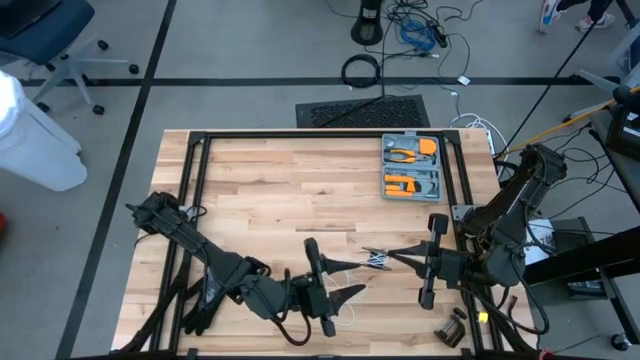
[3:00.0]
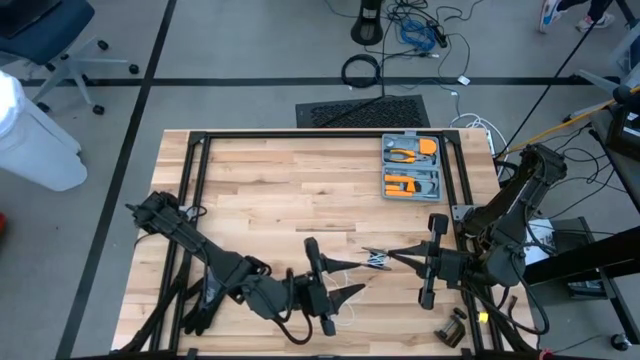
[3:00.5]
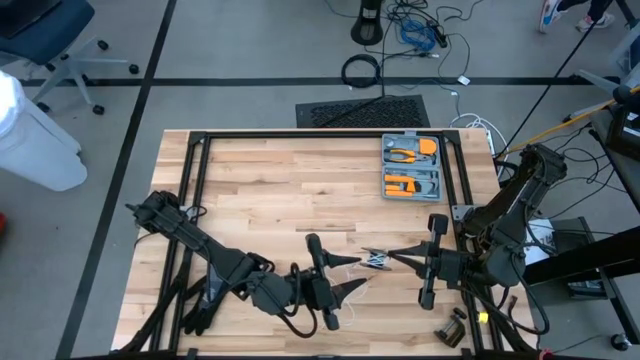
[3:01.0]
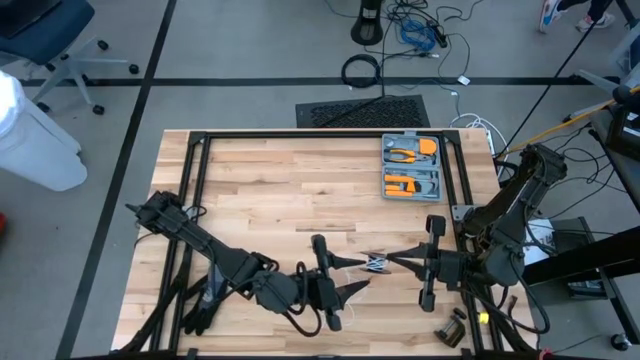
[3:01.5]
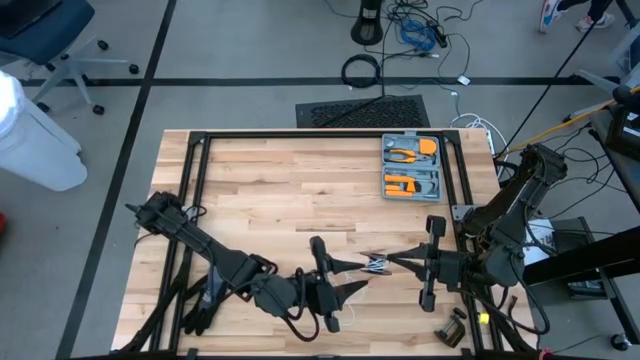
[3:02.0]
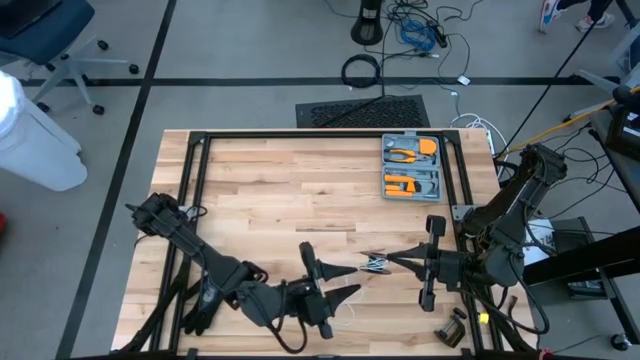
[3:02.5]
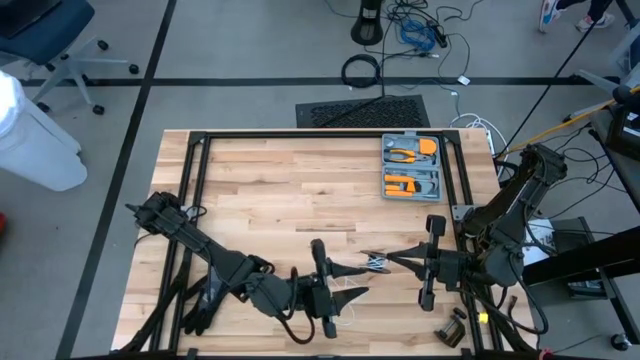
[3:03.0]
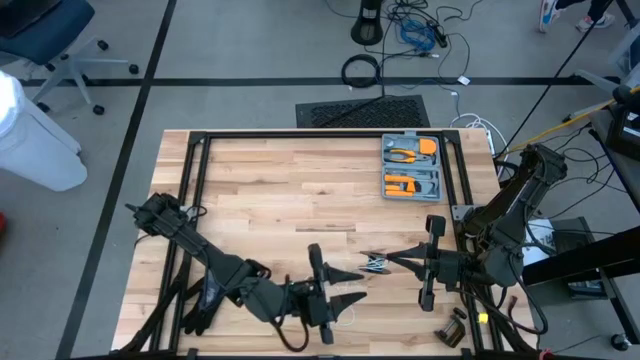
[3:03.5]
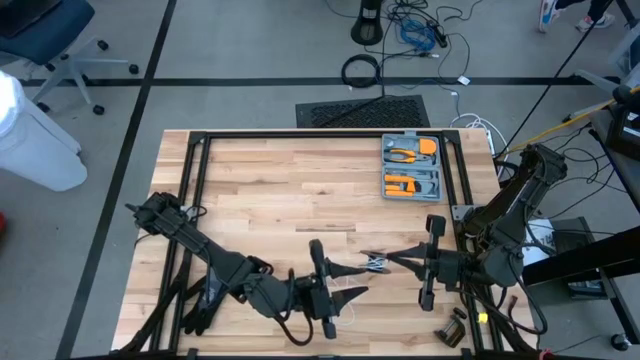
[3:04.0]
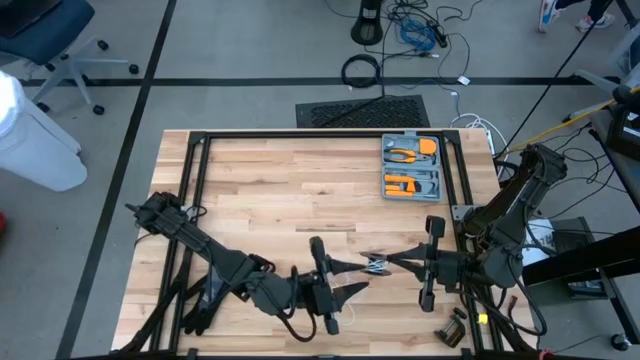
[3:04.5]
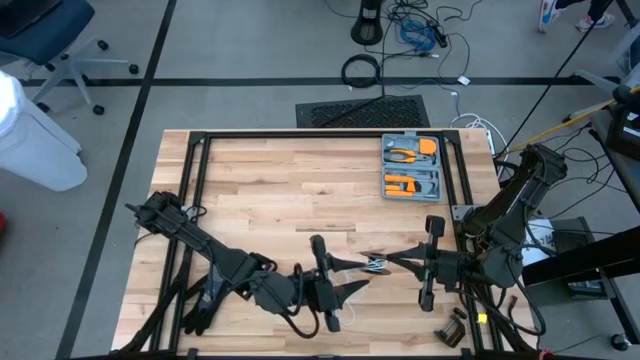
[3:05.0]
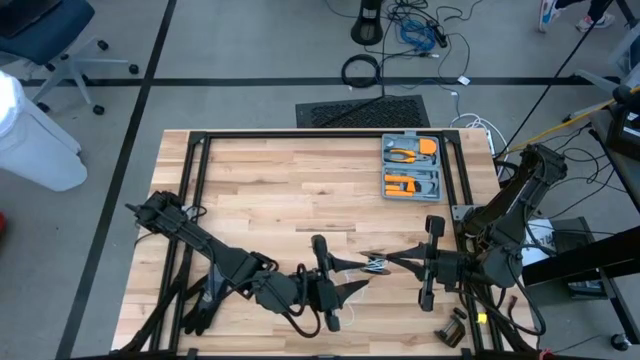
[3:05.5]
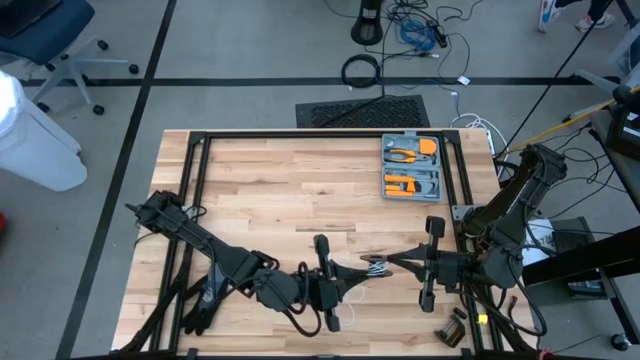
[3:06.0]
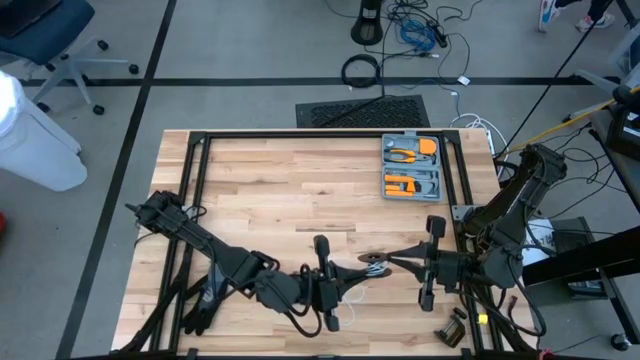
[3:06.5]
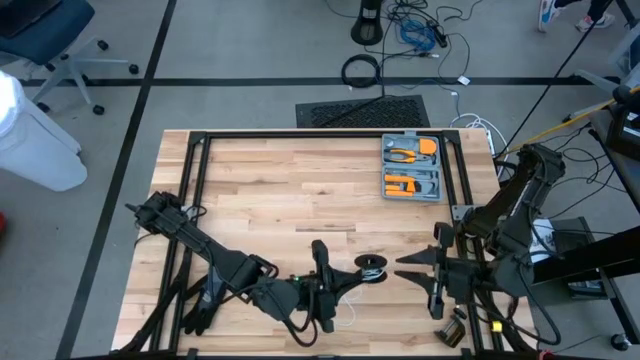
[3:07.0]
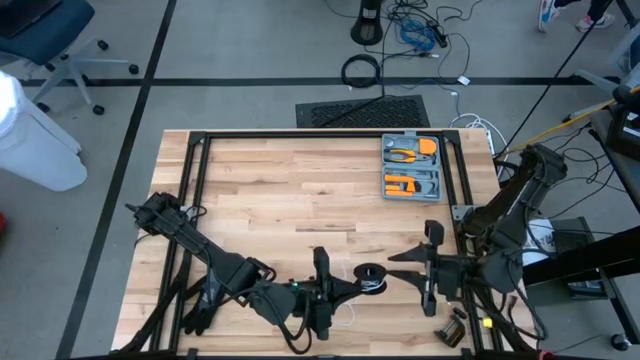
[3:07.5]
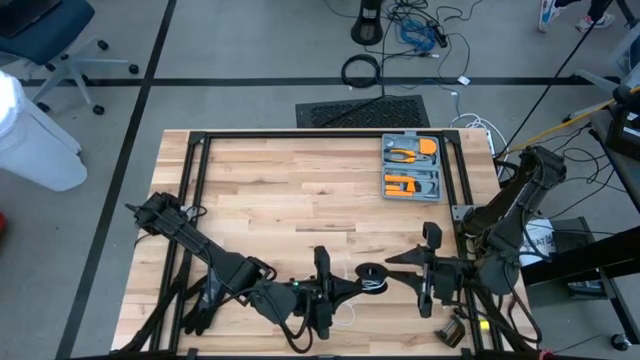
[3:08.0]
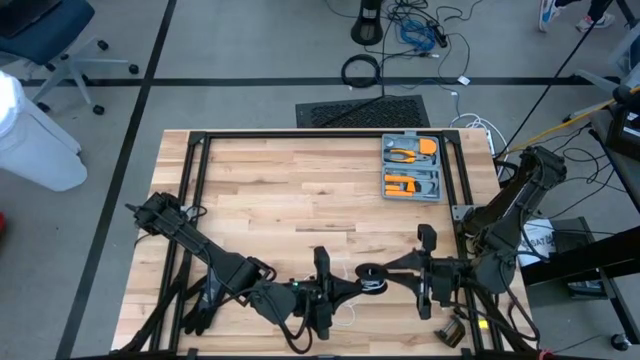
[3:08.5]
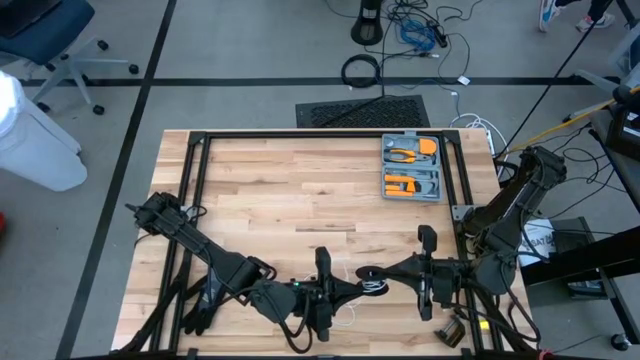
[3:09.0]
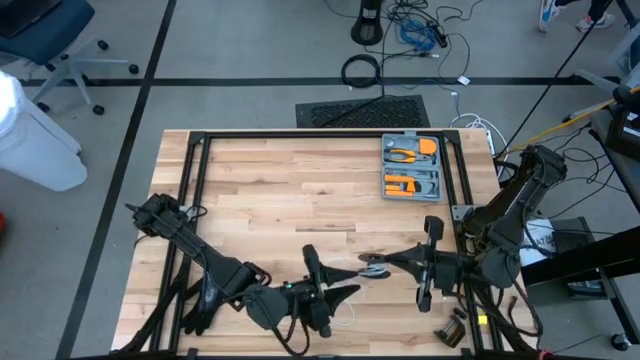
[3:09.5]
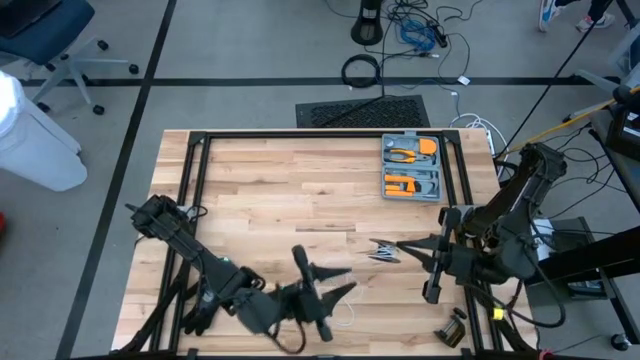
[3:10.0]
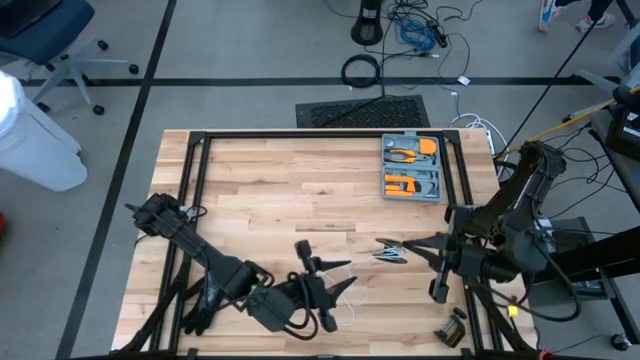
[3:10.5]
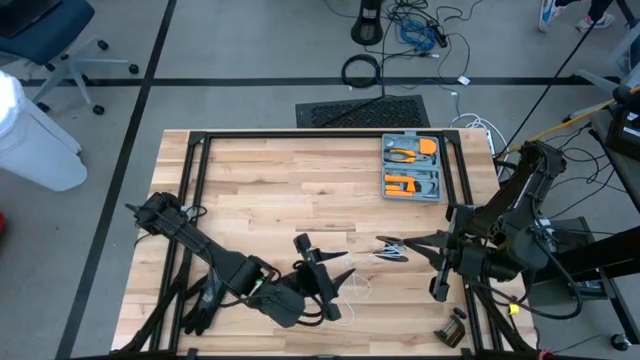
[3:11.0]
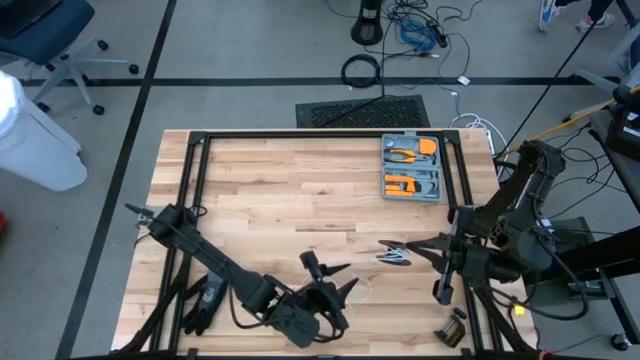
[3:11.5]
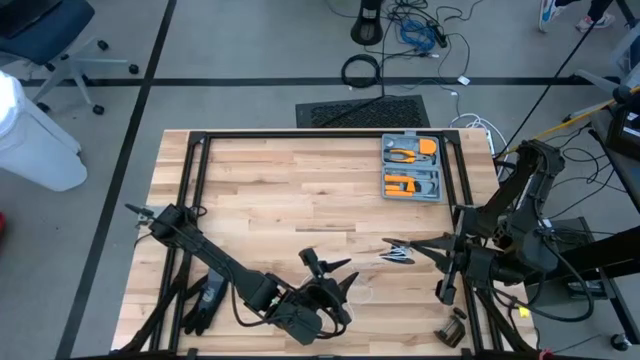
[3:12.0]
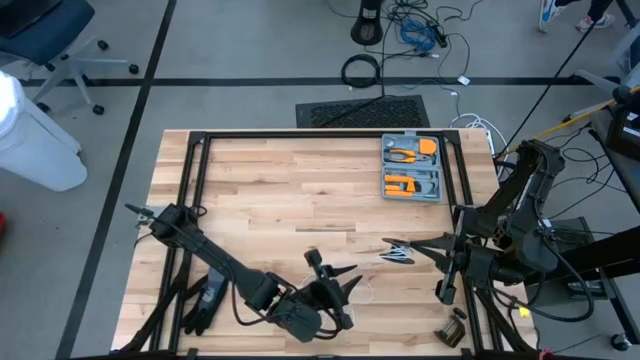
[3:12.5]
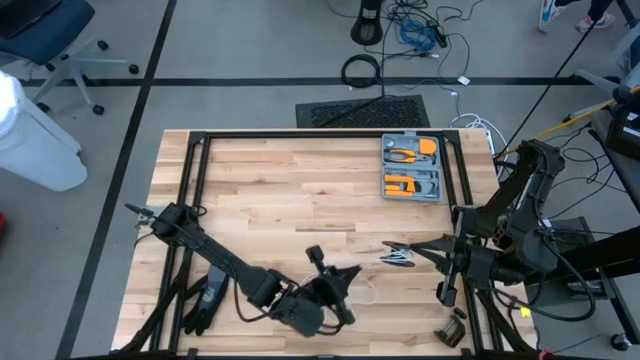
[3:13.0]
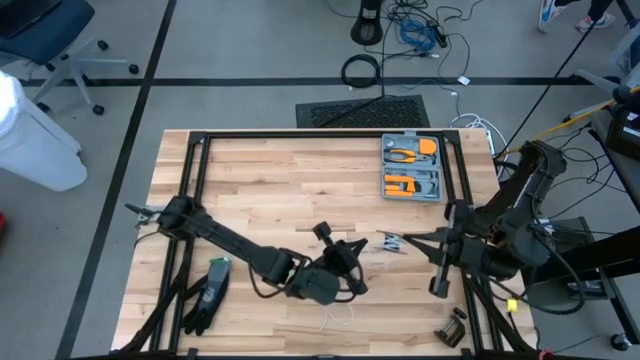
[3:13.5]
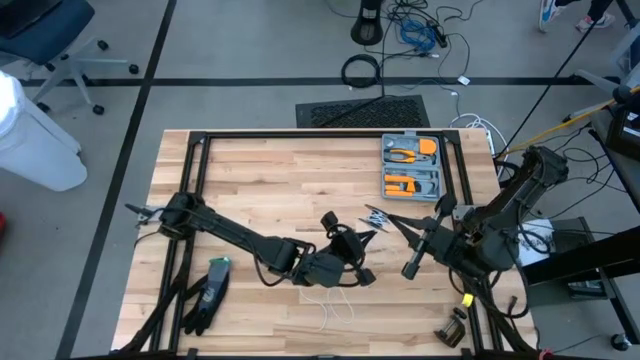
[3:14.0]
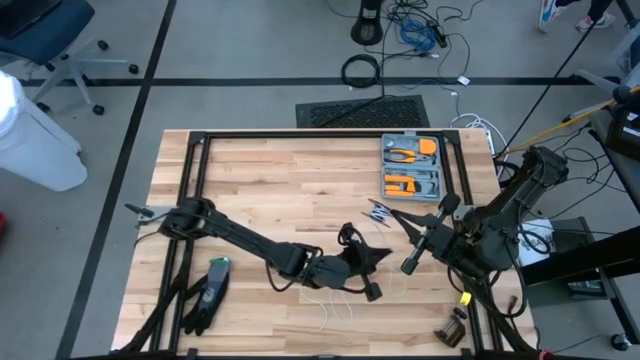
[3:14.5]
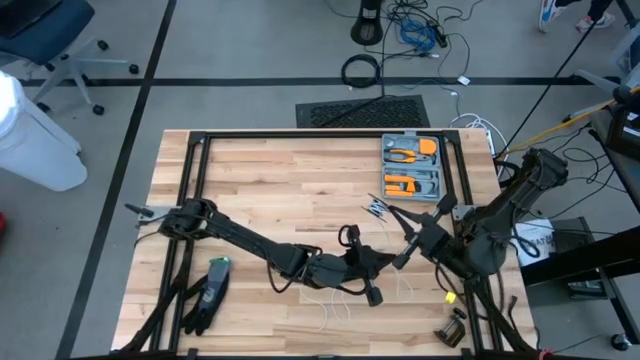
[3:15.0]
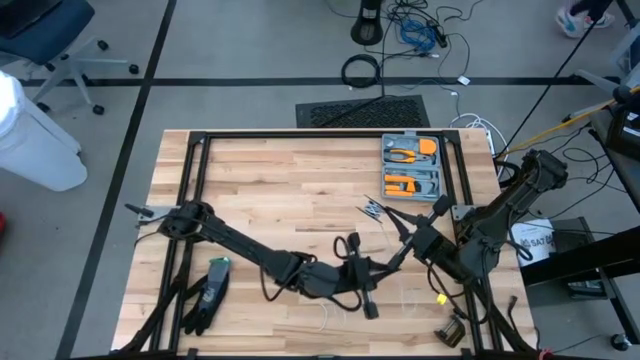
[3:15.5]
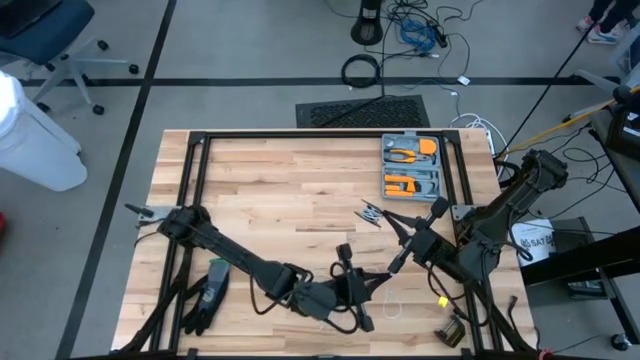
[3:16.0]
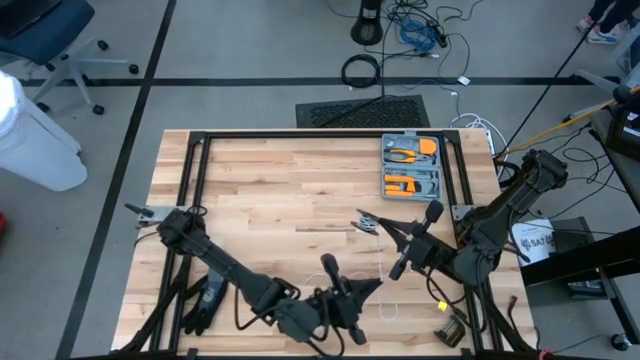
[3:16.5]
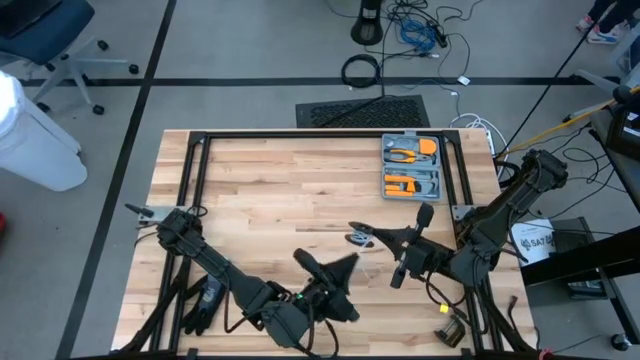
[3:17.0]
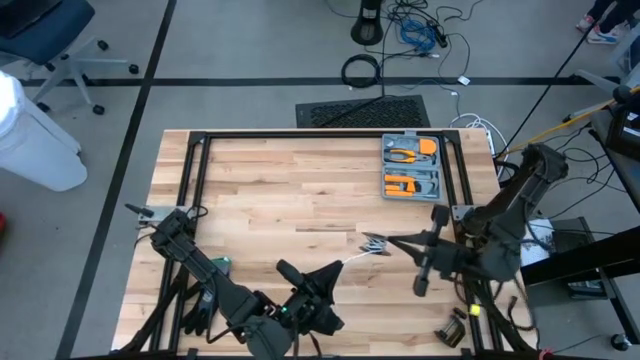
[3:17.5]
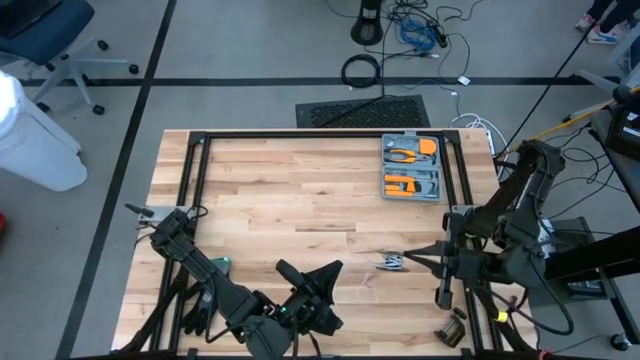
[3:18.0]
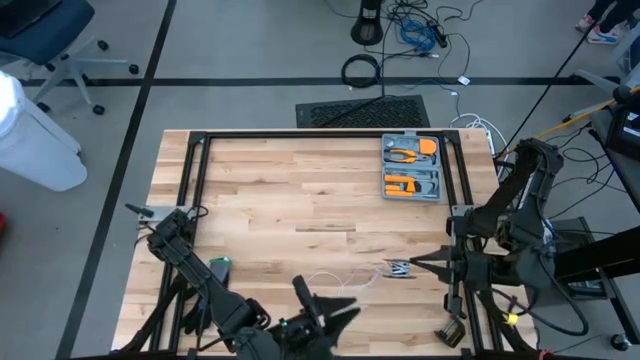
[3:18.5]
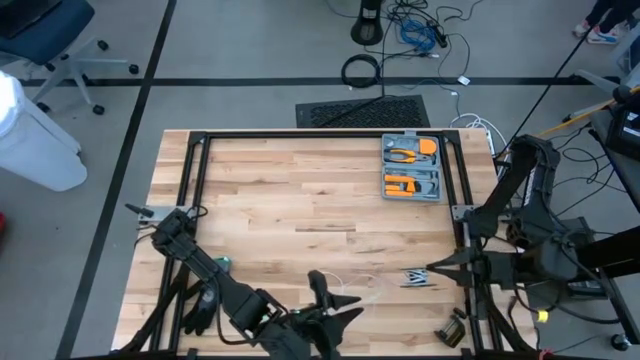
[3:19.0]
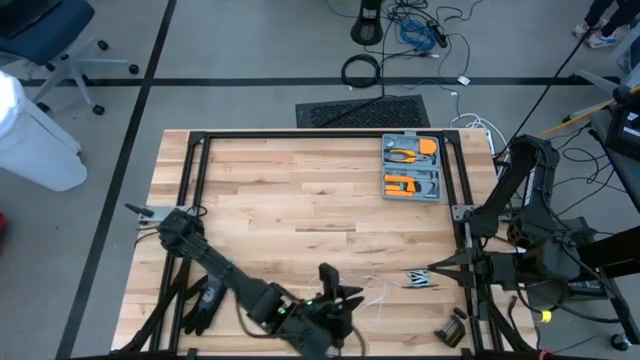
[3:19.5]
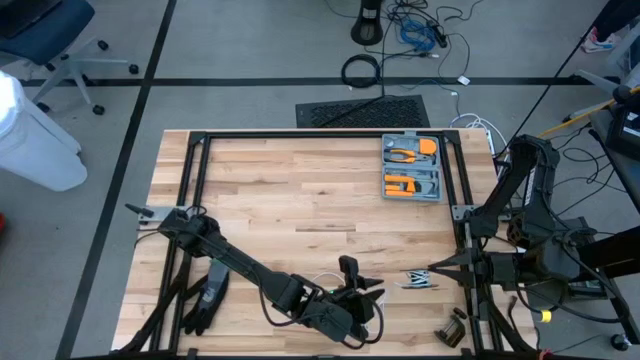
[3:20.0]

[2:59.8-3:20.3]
Task: Coil cords
Coil the white wire onto the spool
